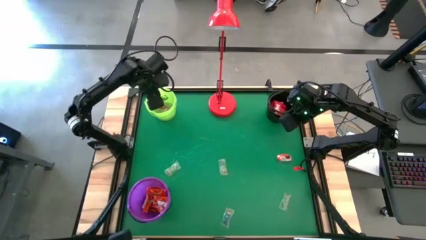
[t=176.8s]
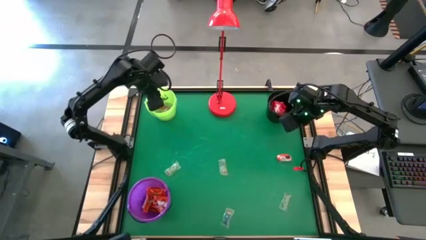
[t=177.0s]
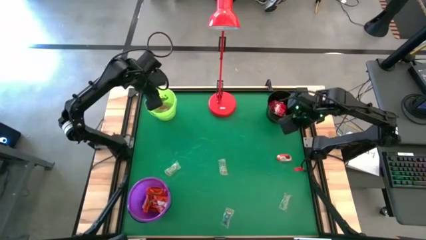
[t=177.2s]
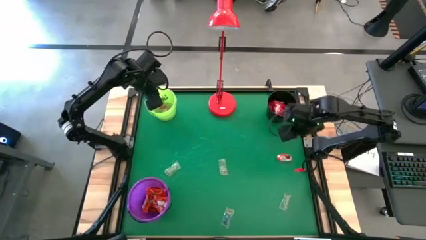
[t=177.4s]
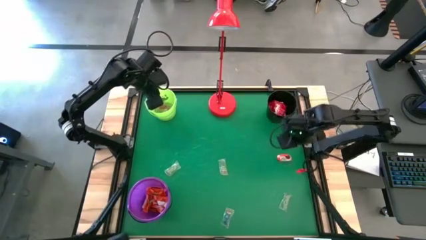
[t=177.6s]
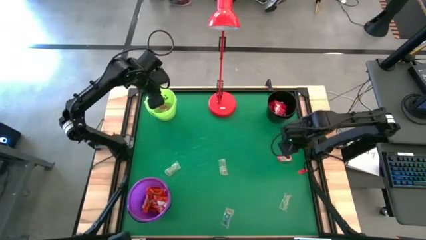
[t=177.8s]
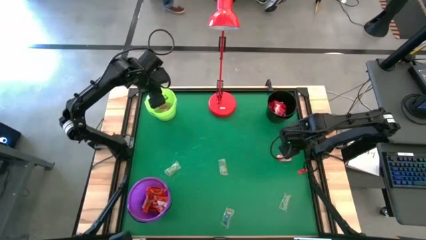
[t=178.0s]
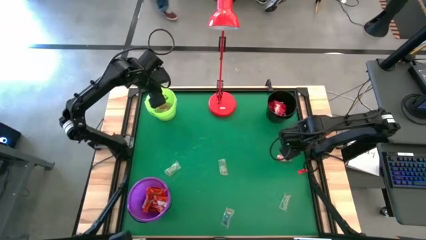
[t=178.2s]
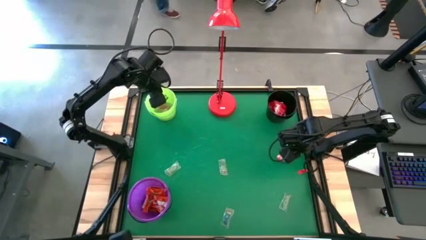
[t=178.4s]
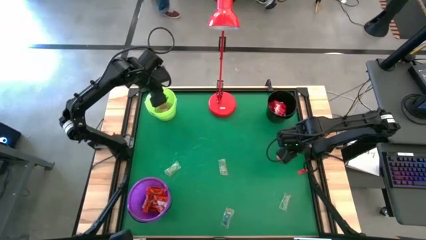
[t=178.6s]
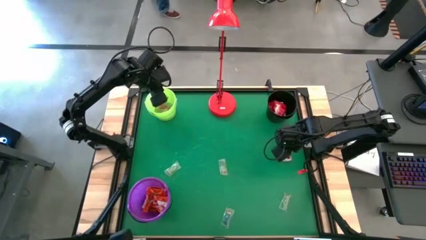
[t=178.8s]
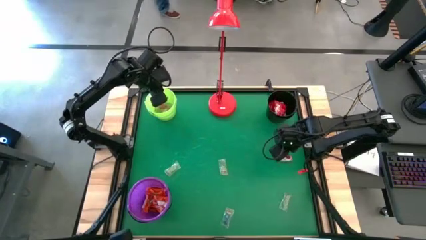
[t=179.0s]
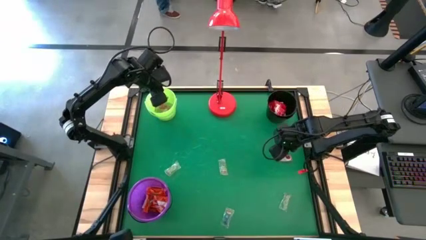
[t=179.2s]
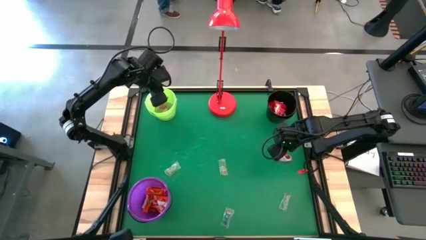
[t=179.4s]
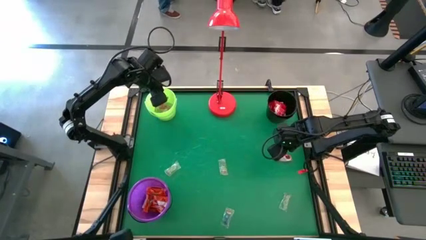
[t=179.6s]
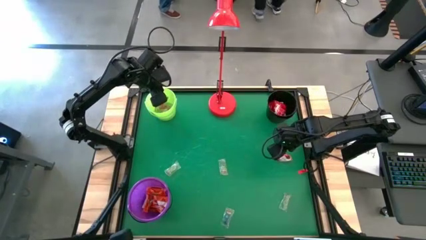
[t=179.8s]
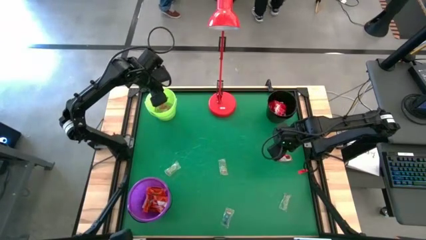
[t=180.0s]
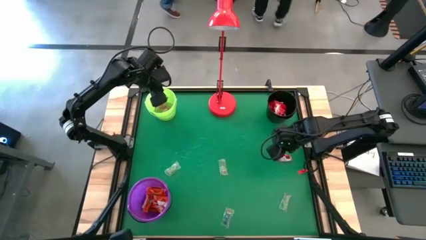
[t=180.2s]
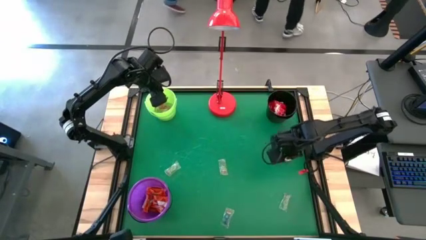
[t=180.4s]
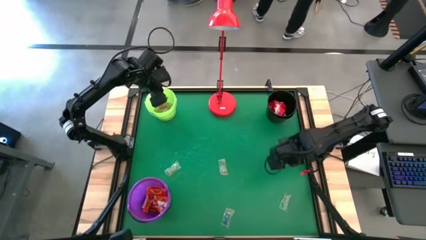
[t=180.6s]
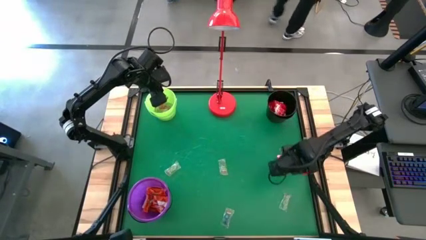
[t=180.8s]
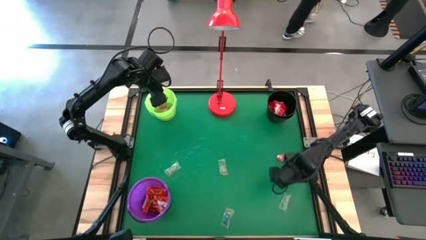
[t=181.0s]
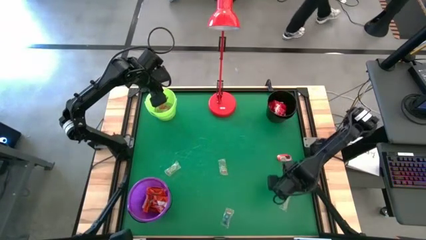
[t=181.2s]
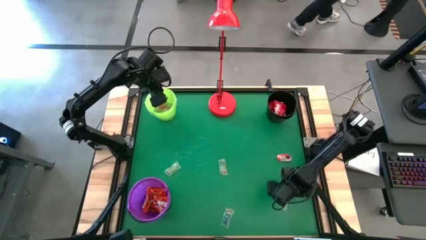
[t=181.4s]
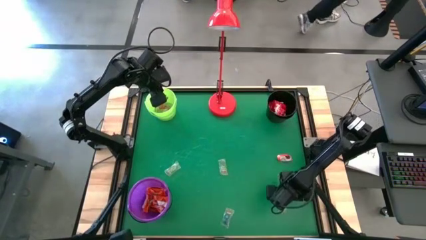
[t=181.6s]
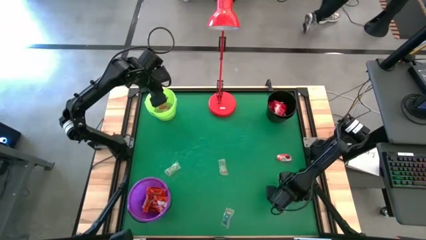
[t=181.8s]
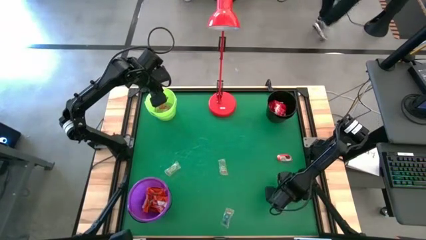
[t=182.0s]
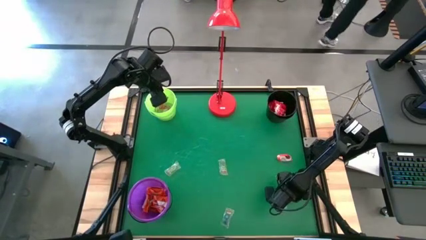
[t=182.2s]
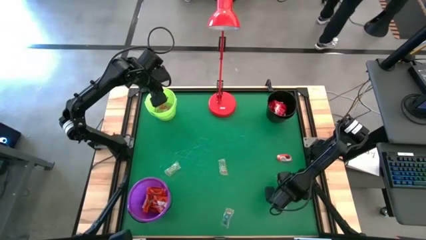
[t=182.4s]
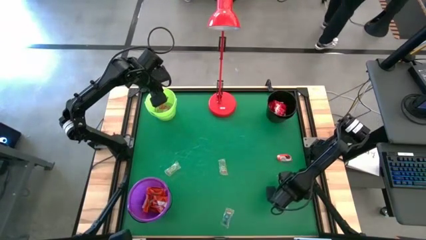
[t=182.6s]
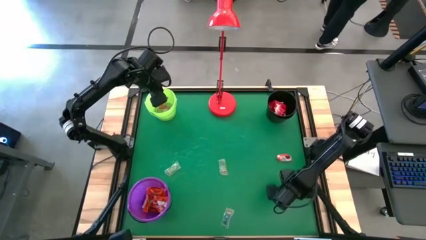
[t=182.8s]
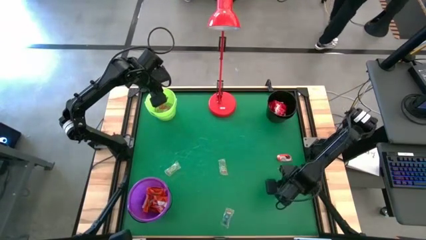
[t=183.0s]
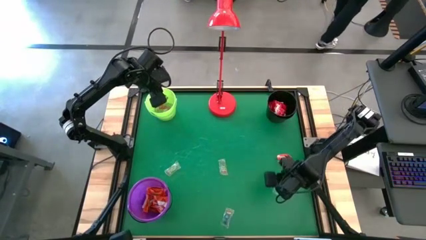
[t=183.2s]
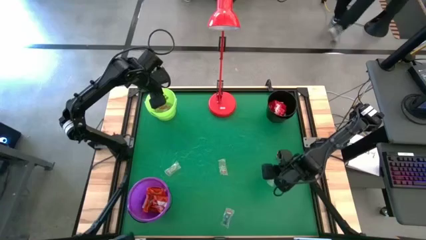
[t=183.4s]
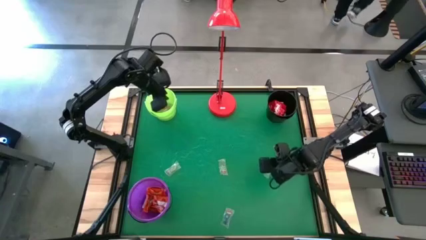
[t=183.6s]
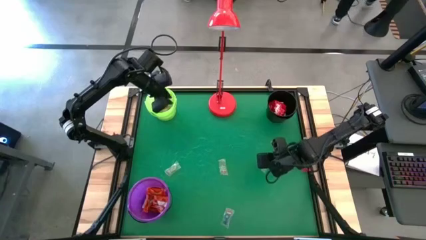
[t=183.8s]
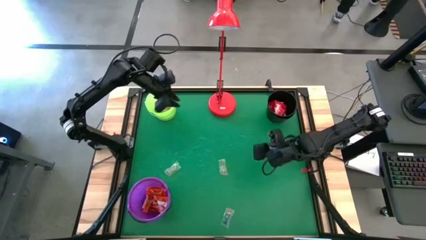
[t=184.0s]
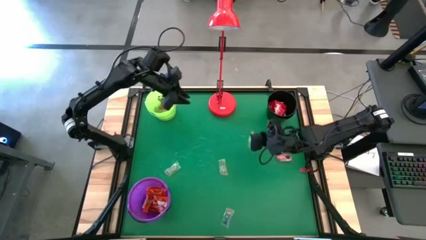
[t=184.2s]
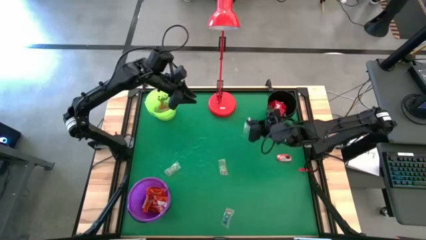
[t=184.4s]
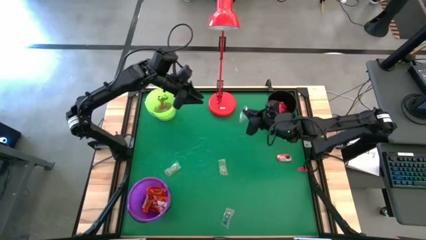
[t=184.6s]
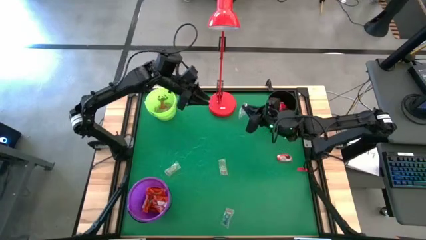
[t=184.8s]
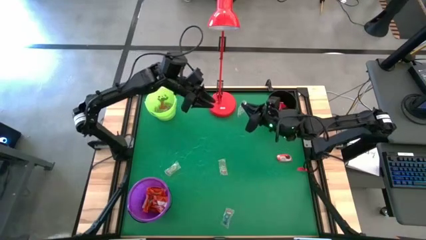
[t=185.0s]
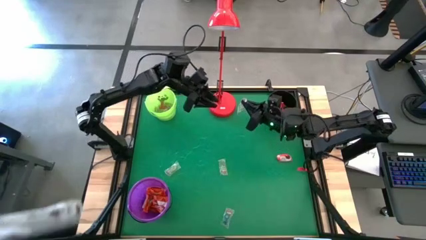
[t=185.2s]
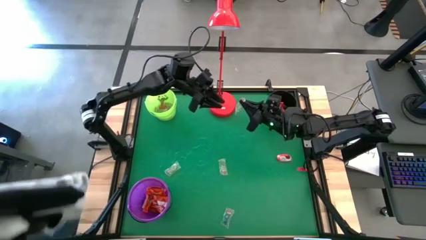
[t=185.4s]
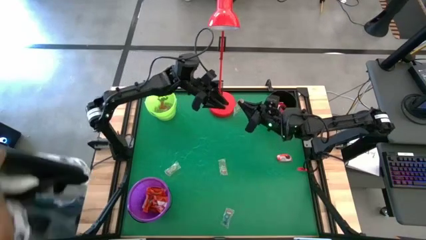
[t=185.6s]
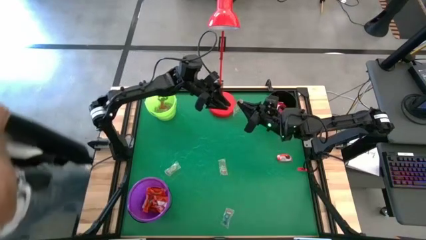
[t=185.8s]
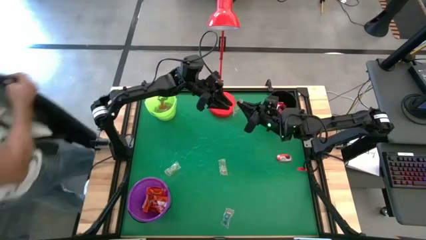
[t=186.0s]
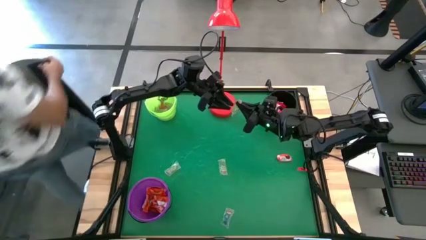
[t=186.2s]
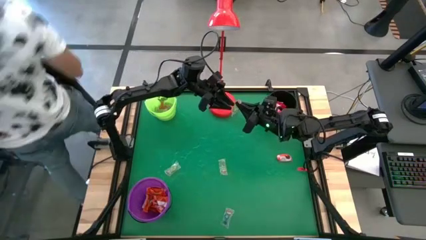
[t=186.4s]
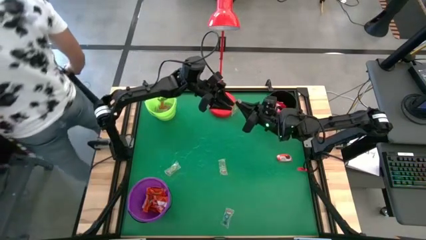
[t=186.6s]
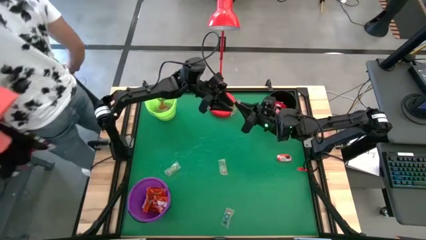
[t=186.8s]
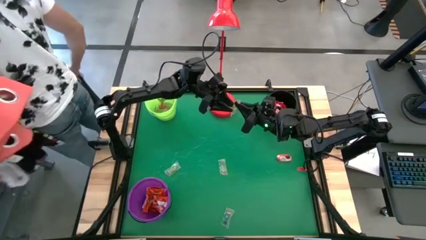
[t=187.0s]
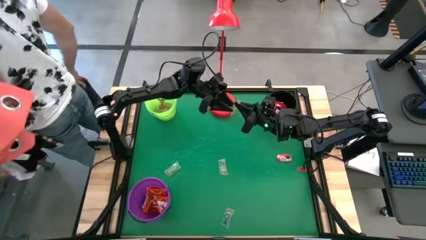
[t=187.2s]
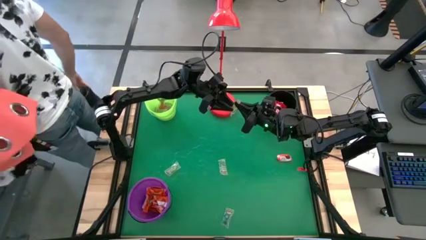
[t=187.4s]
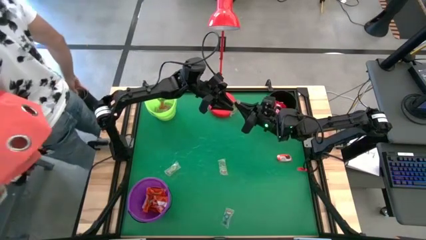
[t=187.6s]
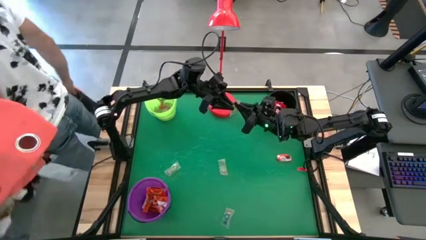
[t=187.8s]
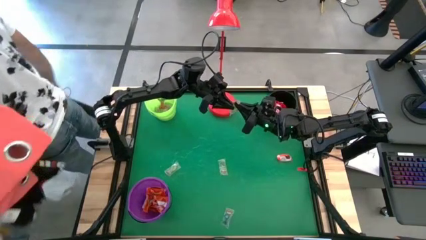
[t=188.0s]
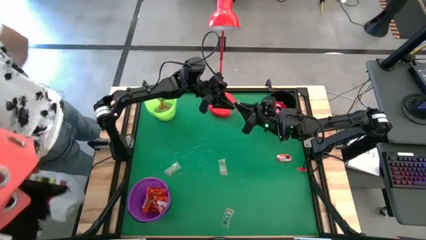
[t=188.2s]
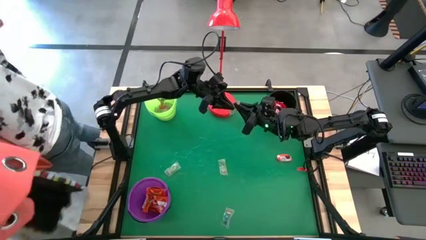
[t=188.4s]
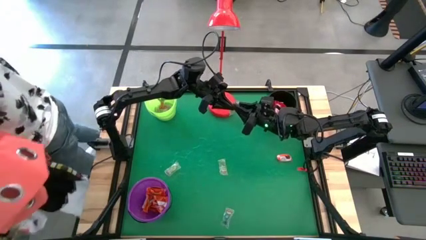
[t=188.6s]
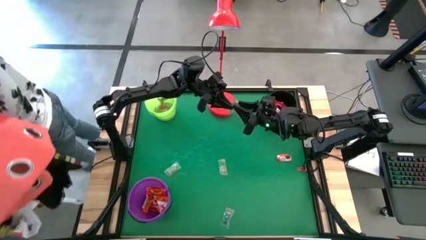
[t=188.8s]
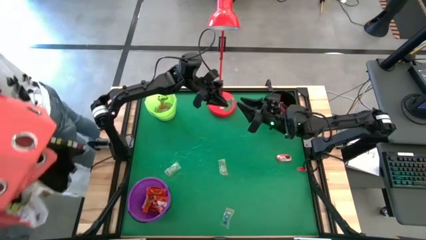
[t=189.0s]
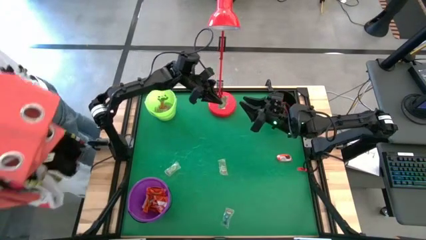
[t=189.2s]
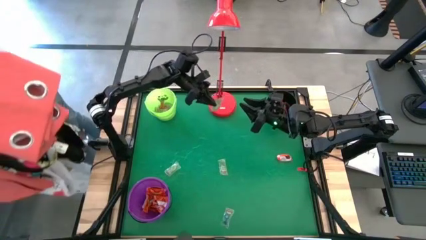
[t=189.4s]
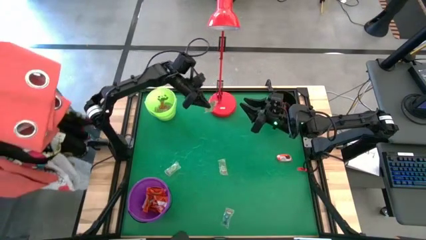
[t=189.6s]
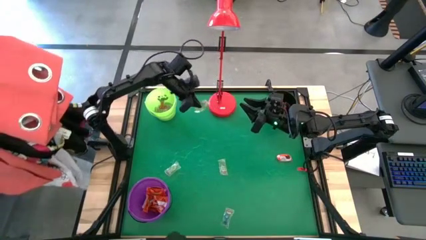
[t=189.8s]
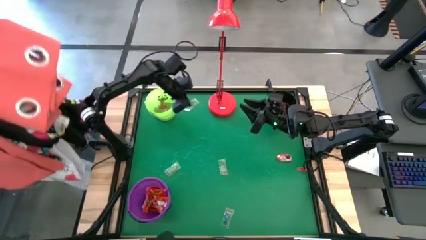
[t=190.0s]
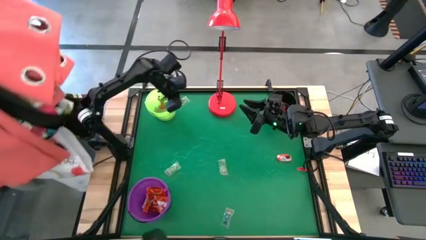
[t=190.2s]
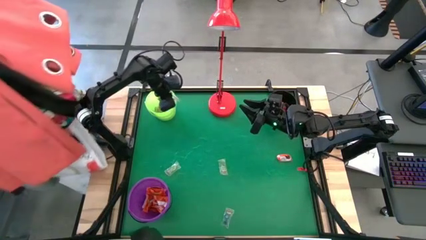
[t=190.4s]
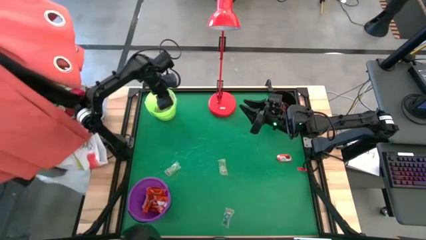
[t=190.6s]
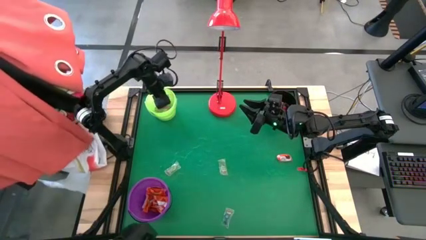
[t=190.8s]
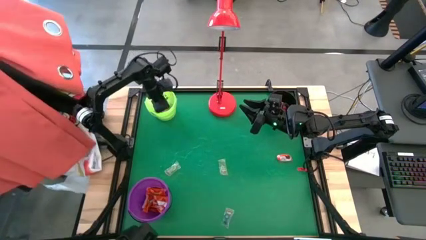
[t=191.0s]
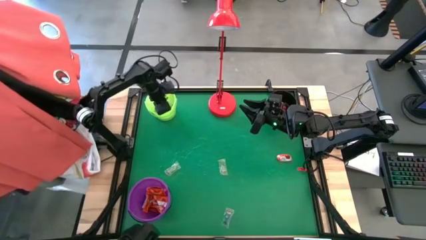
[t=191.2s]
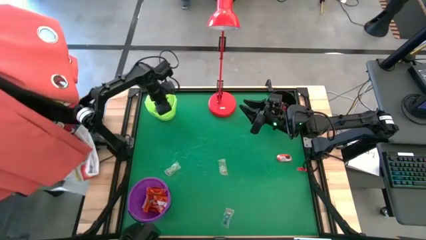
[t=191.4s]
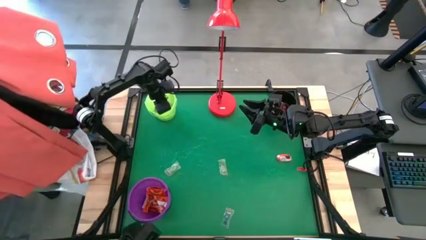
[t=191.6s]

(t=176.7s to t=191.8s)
Task: Sort candy
Put the transparent candy into the green bucket
